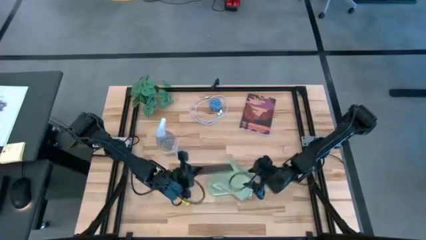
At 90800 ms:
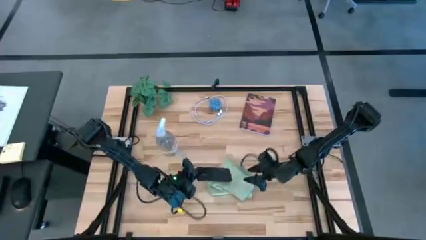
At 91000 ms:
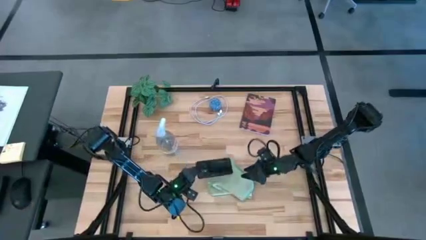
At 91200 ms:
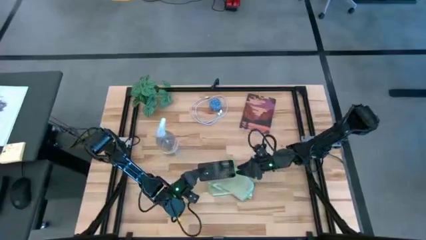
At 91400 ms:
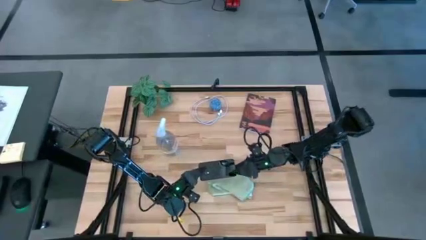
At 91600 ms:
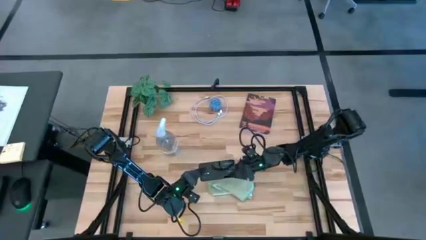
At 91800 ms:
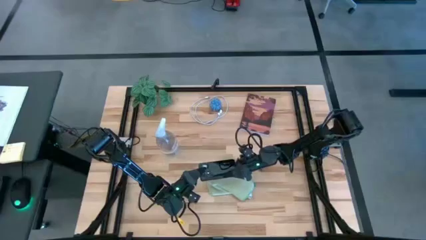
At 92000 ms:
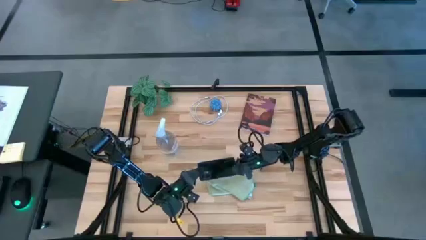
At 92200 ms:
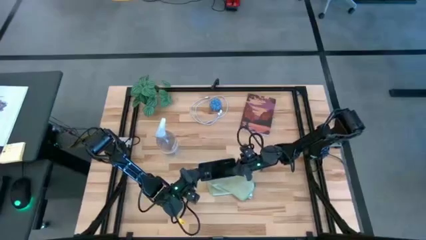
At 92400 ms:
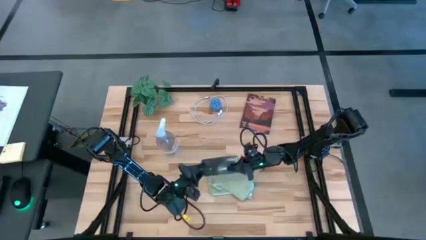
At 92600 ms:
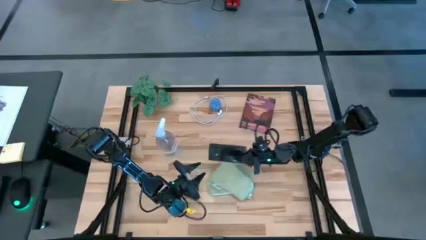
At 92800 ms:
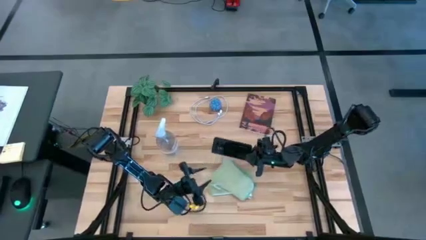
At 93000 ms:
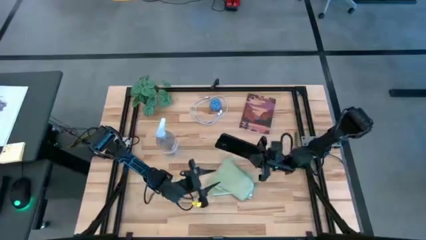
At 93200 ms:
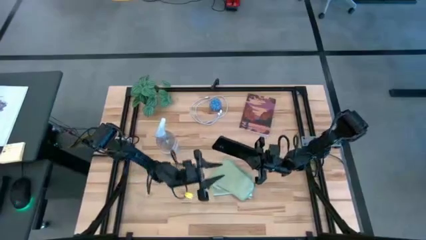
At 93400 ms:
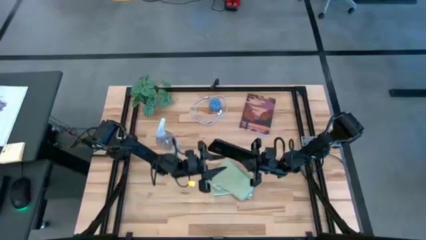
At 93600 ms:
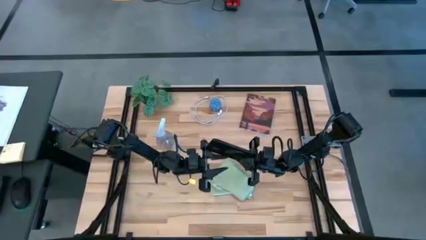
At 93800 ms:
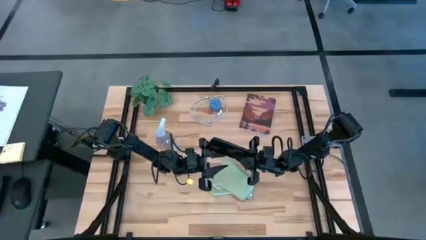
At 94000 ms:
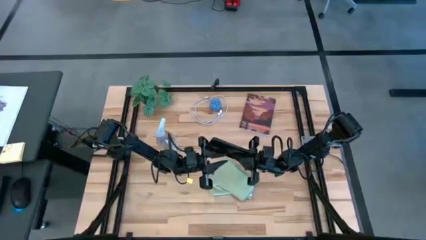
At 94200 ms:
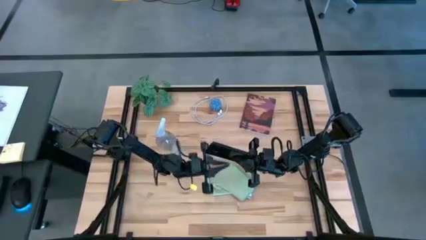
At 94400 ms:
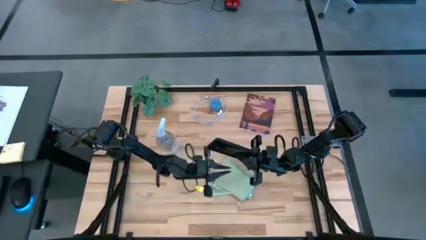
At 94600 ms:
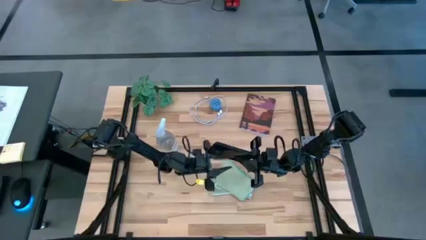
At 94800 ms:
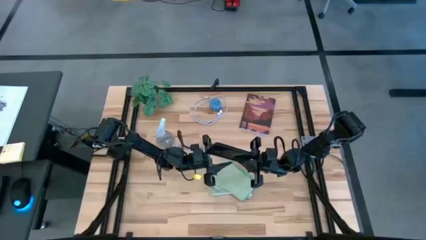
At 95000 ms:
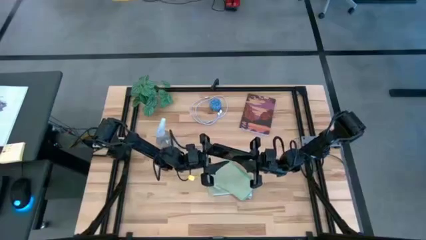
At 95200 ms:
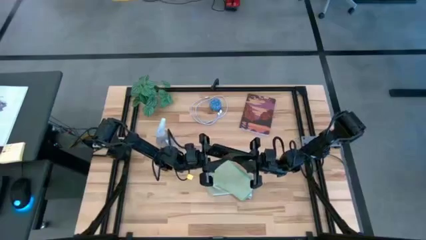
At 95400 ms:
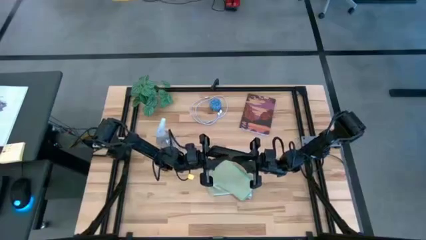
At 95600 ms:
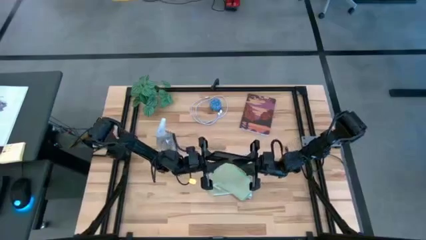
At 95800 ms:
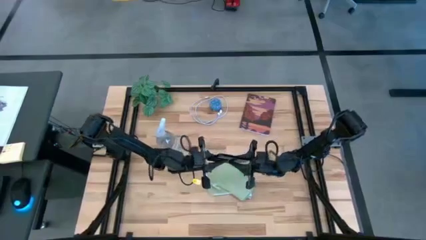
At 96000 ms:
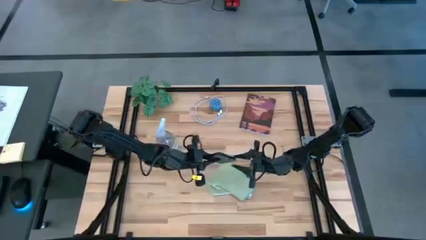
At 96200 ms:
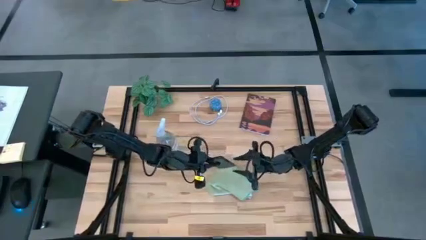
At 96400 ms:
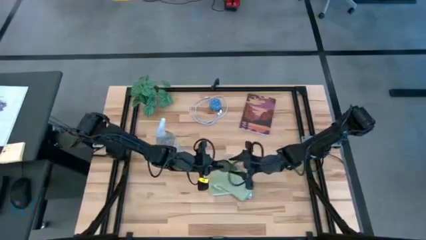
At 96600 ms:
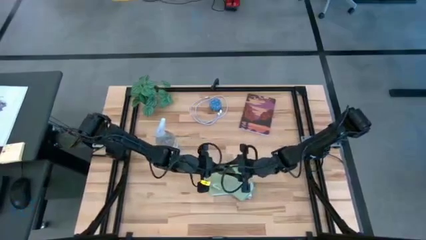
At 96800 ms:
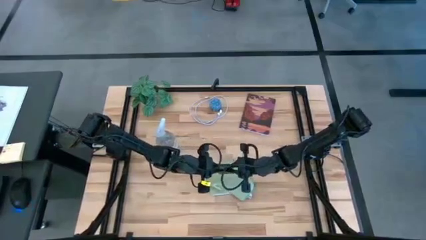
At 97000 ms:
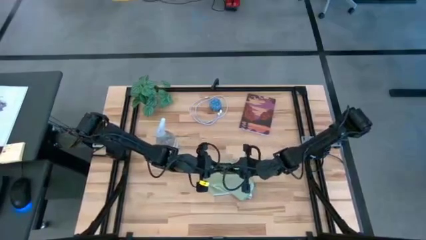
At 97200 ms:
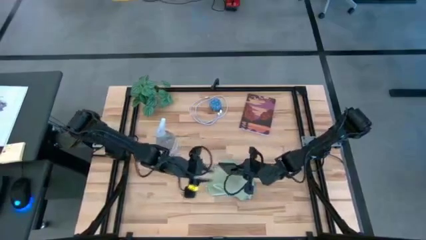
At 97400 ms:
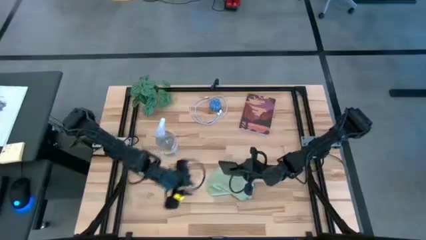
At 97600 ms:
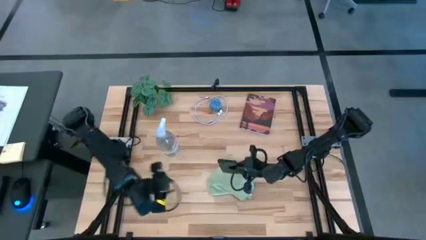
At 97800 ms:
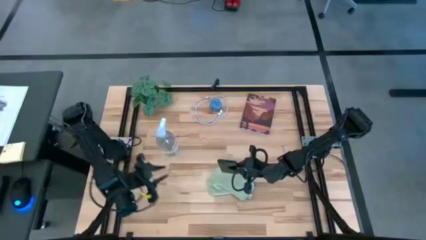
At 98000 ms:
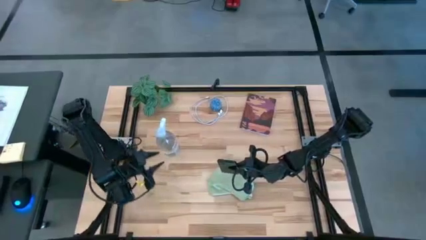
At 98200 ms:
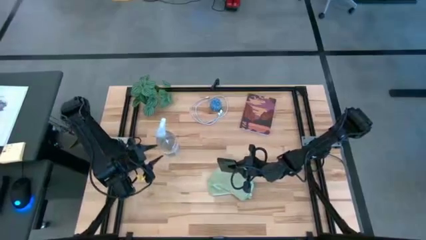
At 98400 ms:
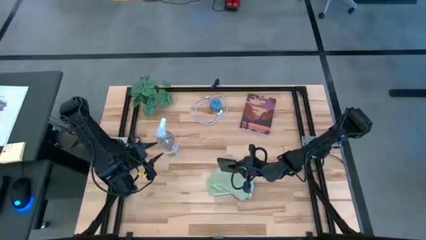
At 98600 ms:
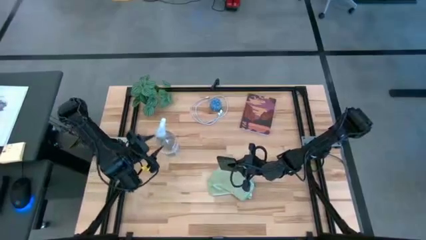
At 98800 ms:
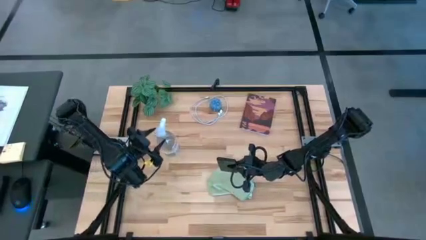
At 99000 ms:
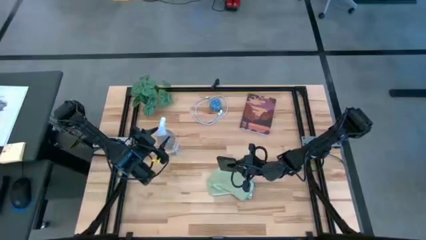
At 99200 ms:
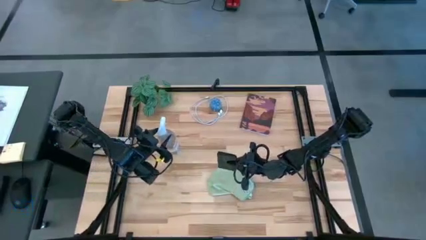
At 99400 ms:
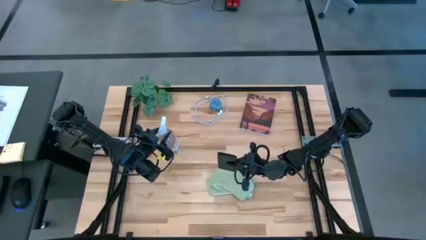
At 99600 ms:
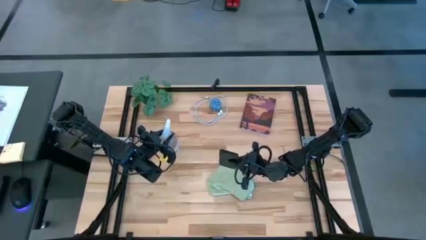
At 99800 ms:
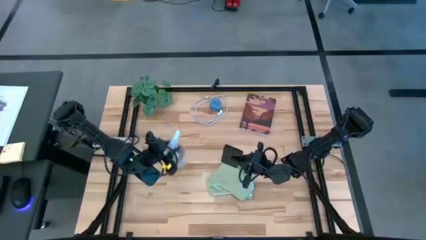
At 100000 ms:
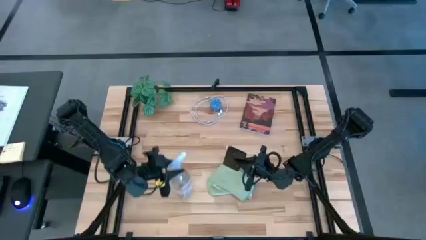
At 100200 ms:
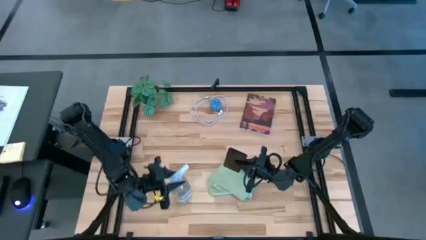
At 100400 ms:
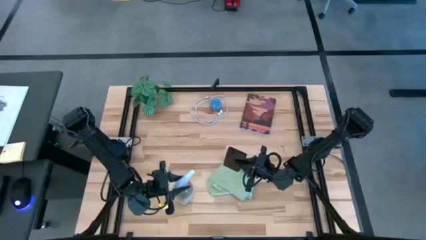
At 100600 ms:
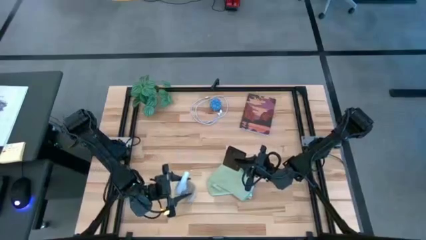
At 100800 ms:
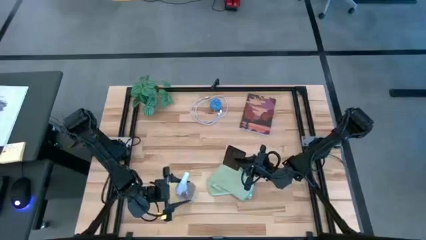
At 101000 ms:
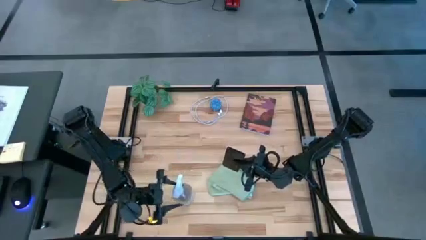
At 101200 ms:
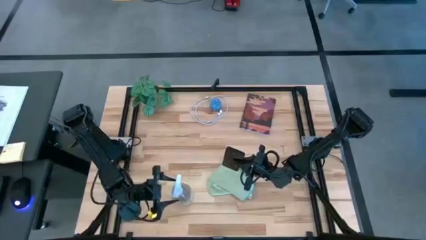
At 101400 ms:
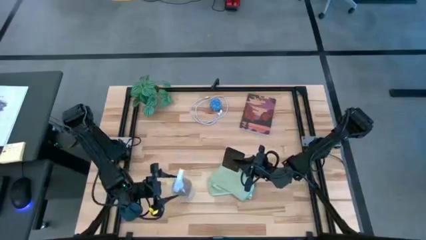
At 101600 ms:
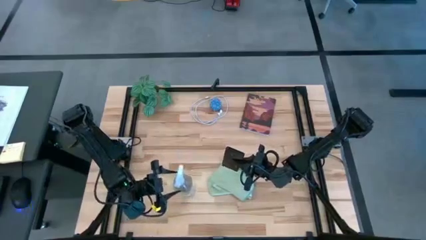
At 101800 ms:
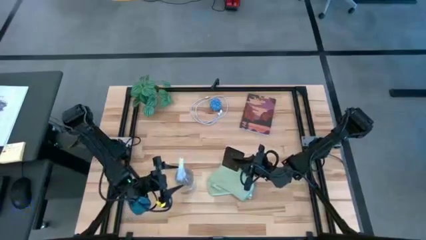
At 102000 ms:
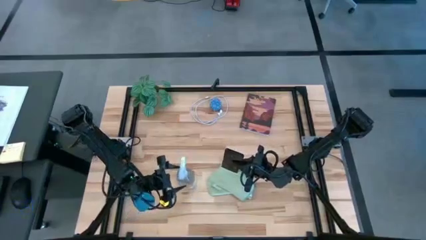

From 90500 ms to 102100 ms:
Task: Apply microfiber cloth
Spray the back of the black cellphone with the spray bottle

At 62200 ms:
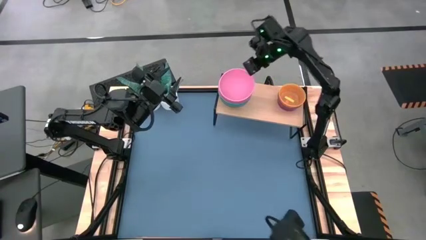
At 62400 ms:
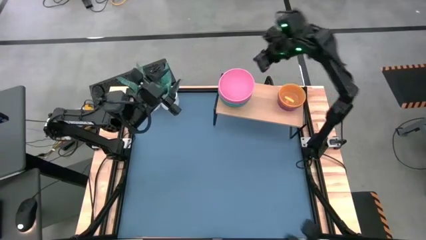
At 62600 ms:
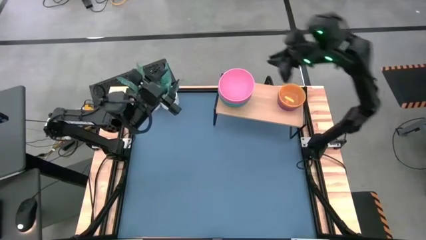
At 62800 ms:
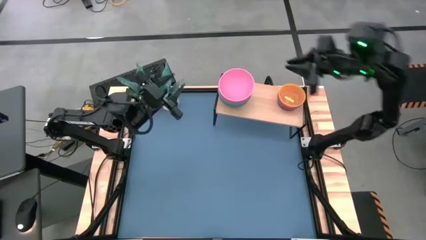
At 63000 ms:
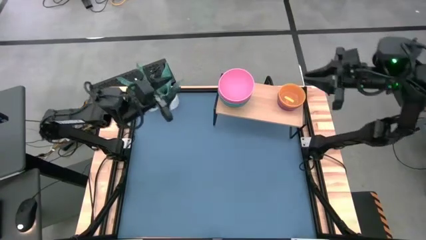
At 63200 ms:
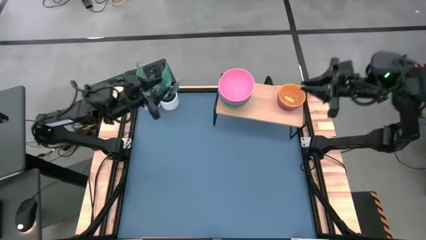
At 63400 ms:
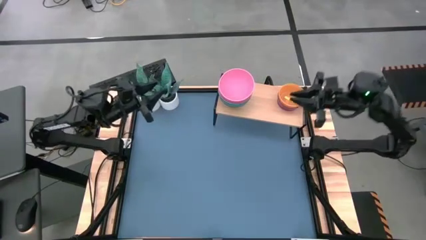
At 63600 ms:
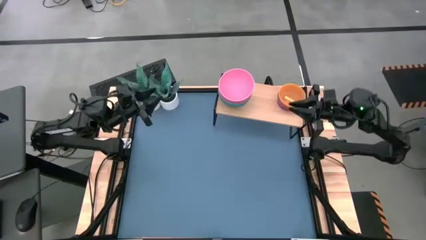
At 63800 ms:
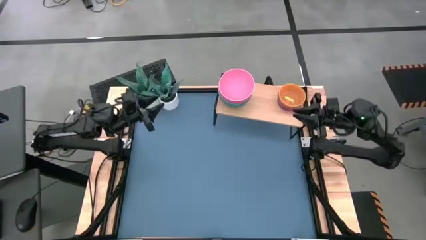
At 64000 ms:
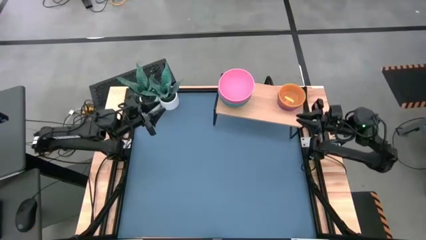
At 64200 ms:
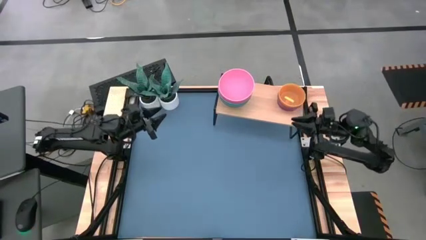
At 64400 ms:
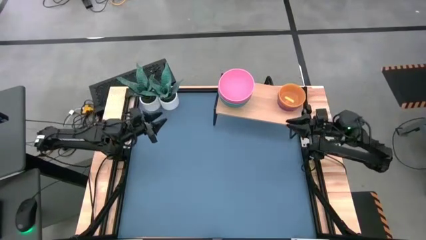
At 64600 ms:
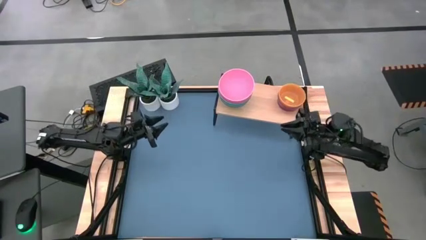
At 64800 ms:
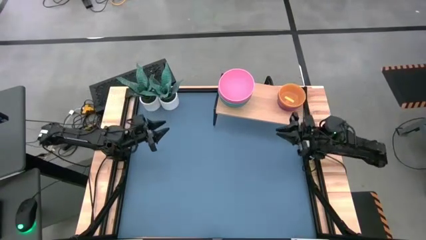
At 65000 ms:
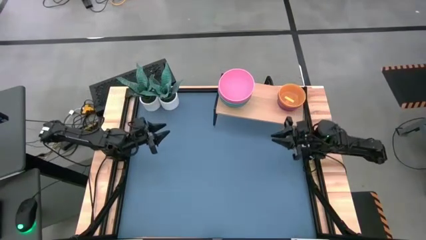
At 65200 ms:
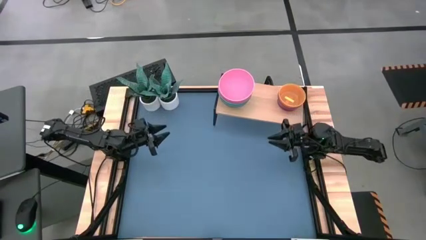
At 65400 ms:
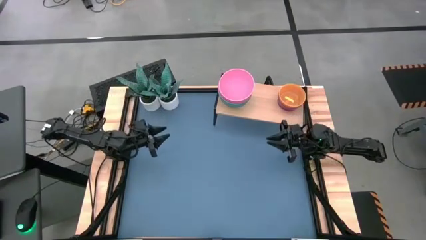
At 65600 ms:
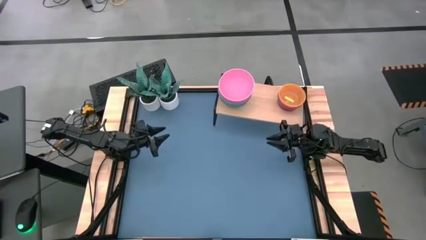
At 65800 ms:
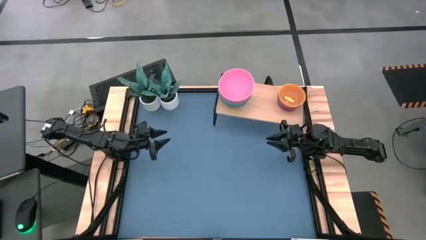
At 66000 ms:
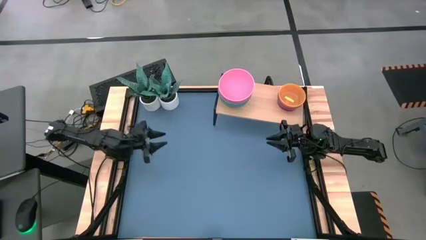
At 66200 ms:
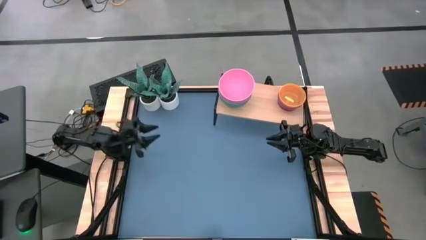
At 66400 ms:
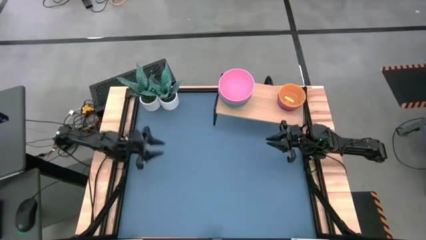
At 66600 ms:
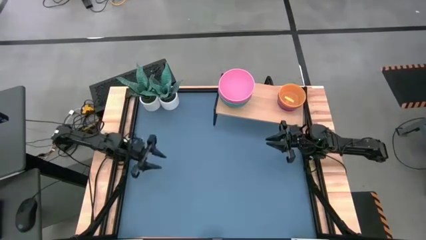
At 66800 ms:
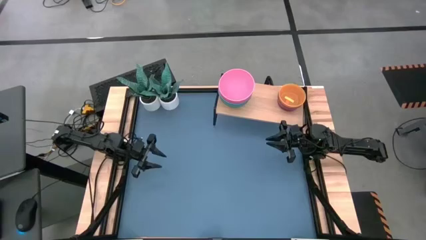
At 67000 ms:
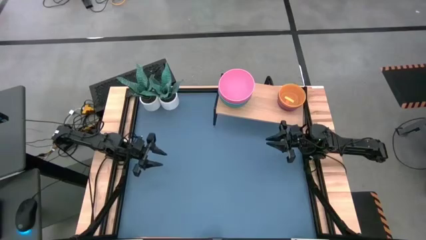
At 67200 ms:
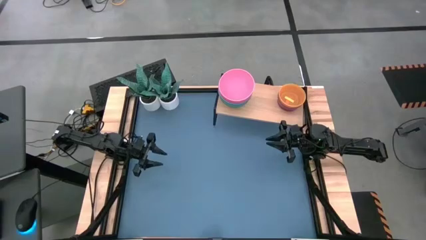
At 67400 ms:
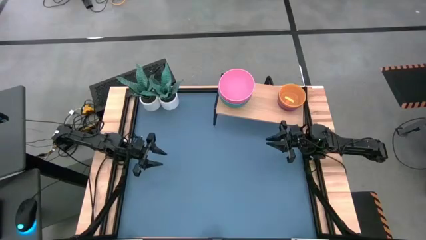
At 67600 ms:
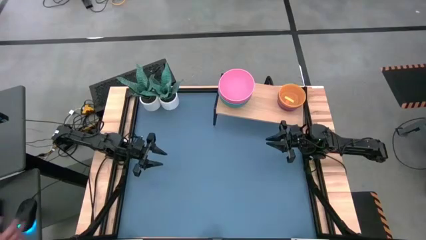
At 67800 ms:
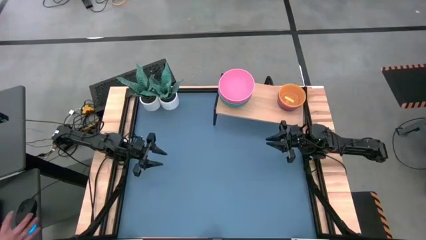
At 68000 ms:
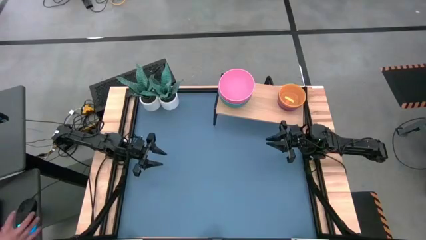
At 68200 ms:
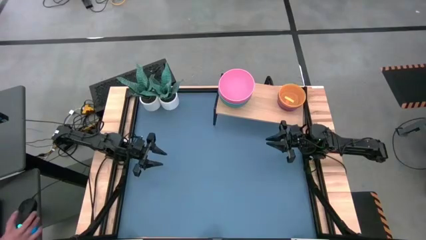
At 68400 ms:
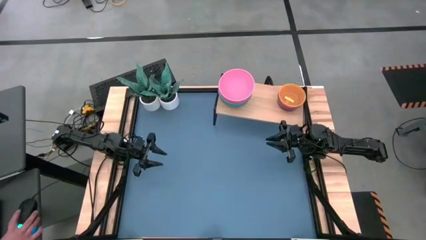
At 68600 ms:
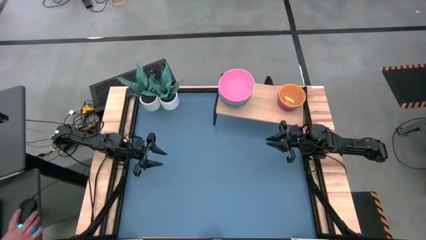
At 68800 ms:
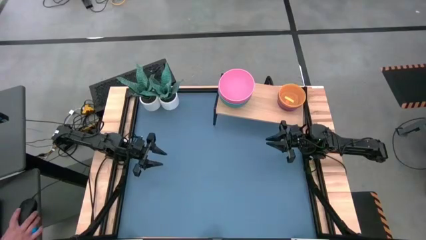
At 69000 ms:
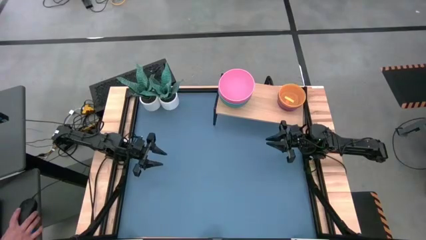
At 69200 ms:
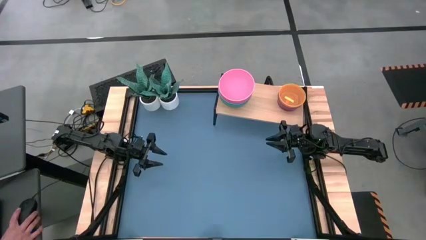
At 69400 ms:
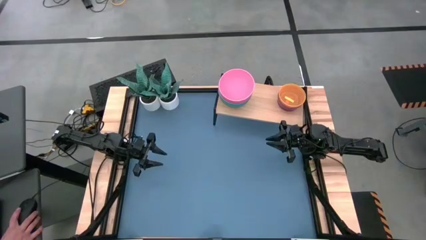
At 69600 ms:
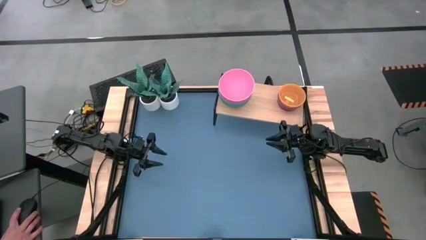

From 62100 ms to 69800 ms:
Task: Place and stack bowls onto a shelf
Return to Home Position
